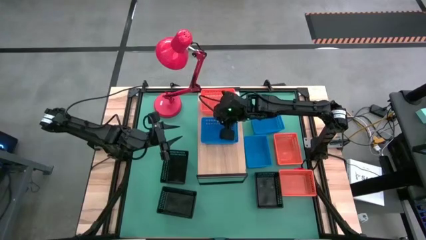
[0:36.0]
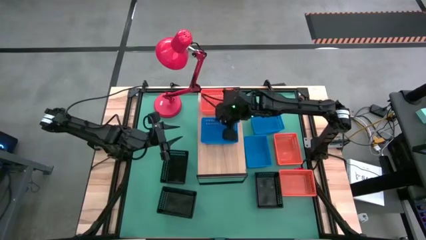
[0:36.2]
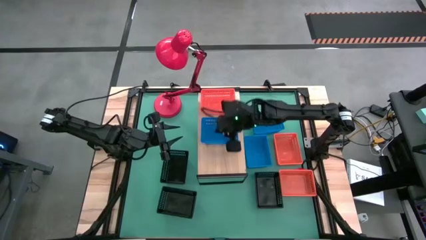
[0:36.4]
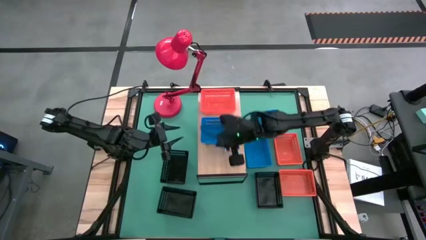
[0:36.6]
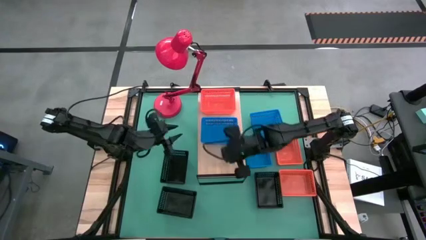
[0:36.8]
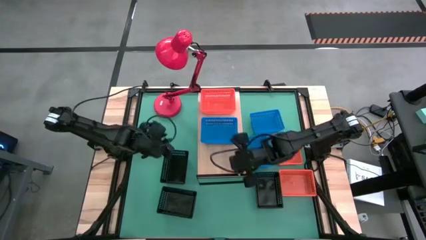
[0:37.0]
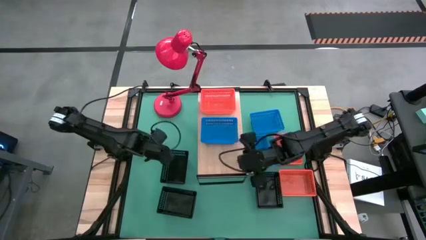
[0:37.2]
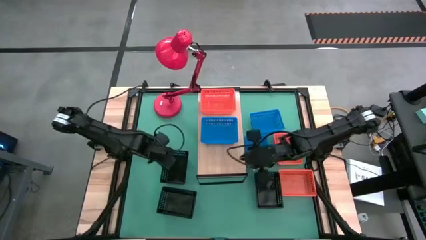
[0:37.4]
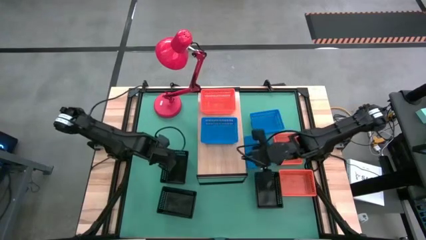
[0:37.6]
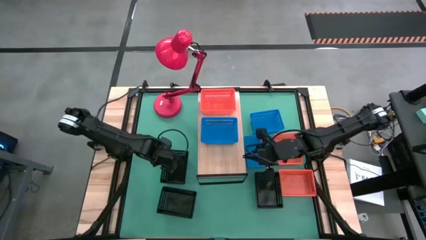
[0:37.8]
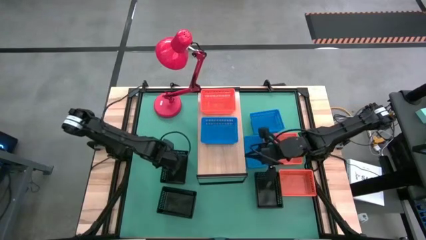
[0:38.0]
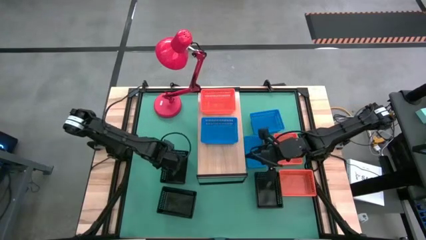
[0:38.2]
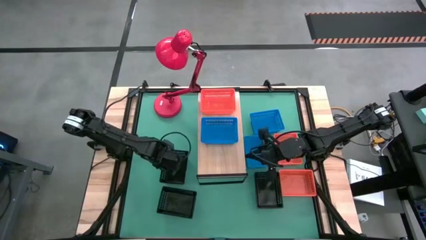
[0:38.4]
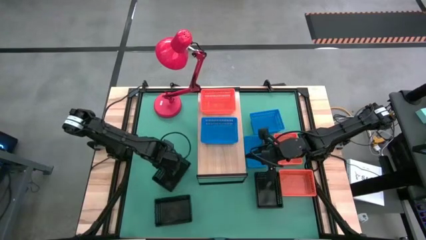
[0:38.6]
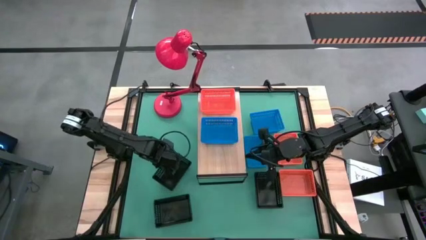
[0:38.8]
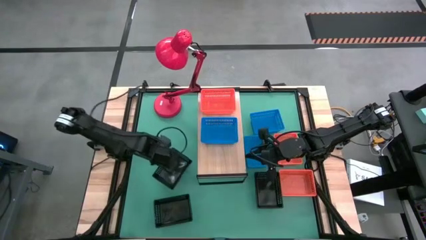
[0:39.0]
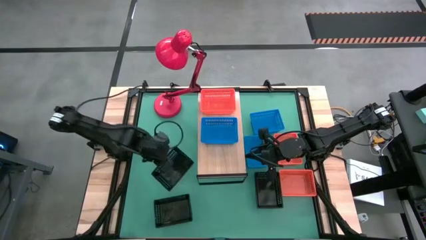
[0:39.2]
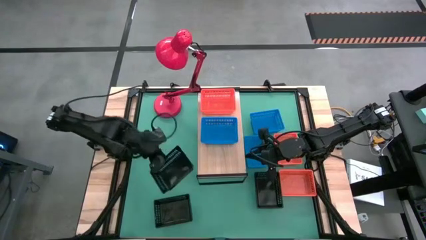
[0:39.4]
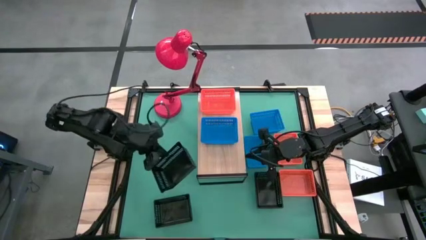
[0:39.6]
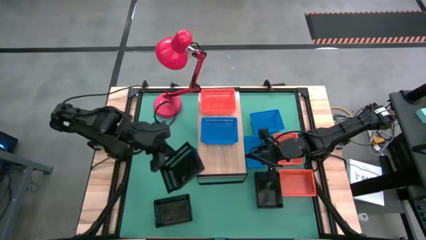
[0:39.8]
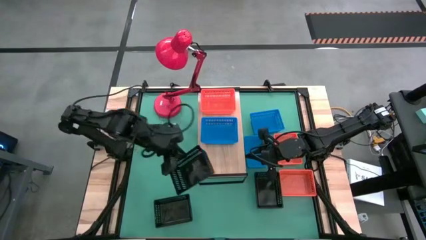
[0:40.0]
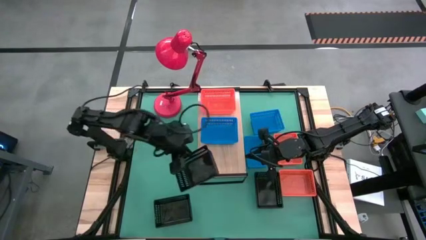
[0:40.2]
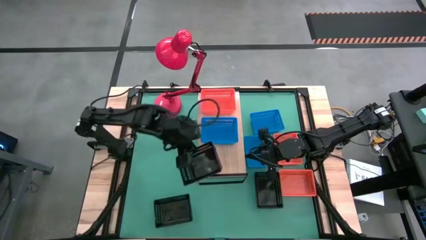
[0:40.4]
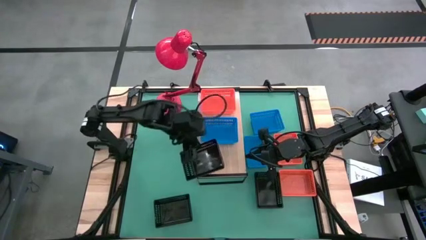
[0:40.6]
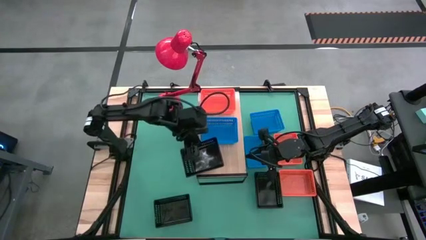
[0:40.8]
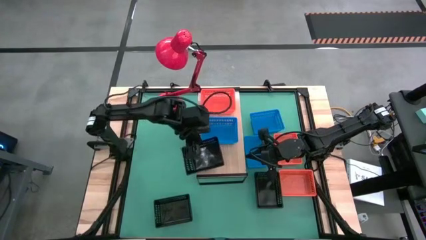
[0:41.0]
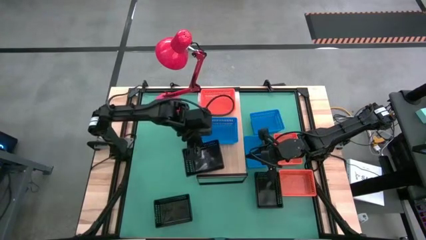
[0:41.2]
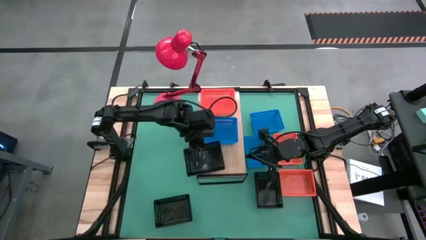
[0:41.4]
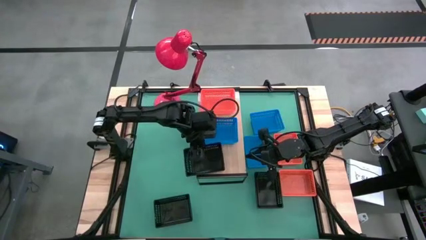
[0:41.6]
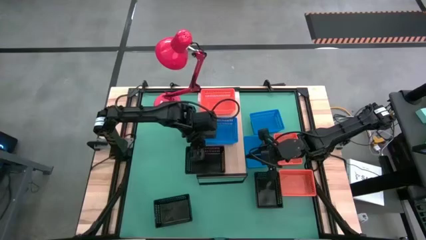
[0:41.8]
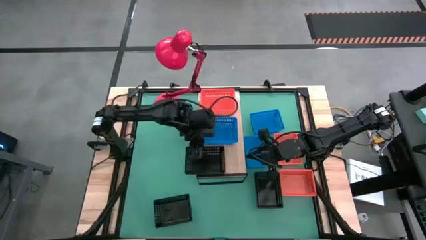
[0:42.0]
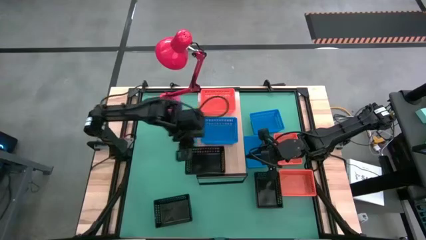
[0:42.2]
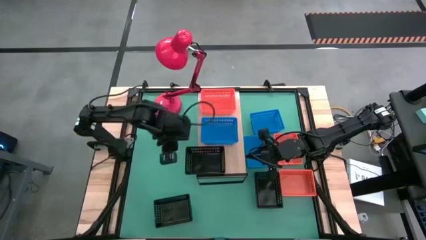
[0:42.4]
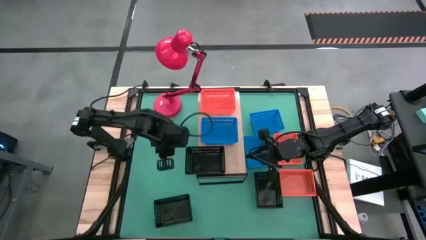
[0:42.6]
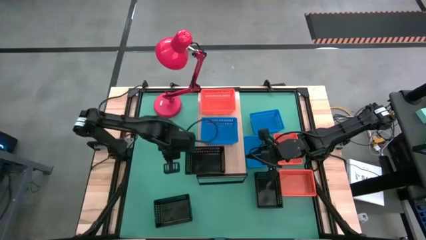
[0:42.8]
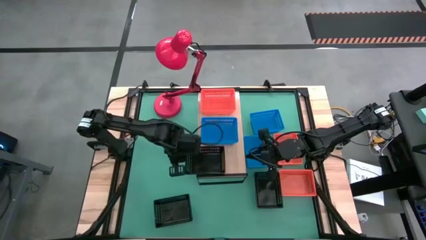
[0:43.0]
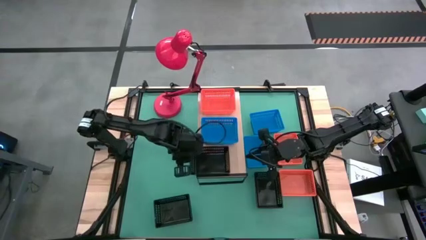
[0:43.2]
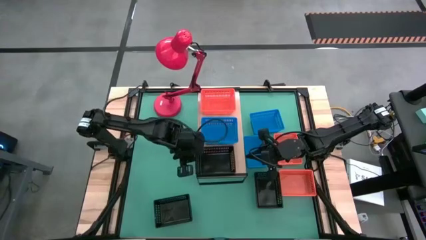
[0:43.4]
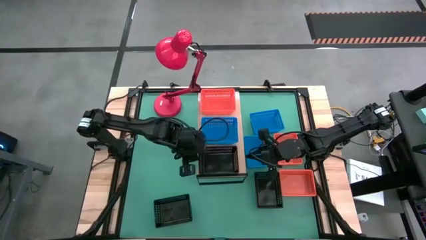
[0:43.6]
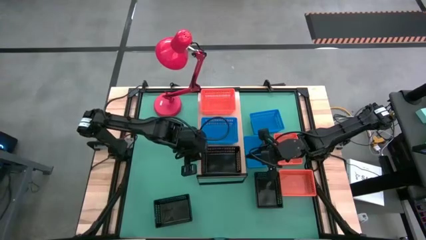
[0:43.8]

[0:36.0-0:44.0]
Task: Stack baskets on shelf by color
Put the top left black bin on the shelf

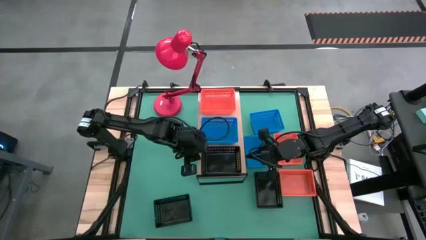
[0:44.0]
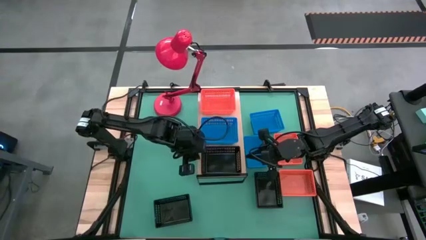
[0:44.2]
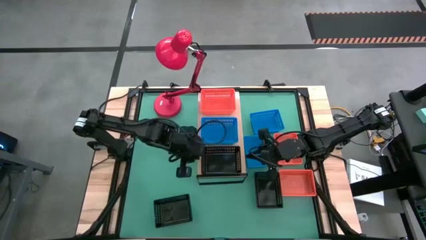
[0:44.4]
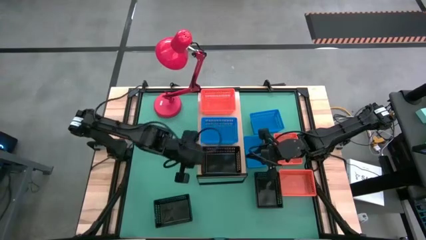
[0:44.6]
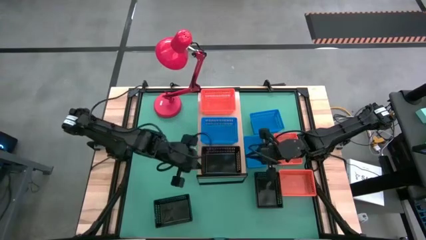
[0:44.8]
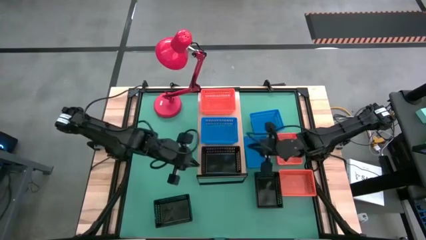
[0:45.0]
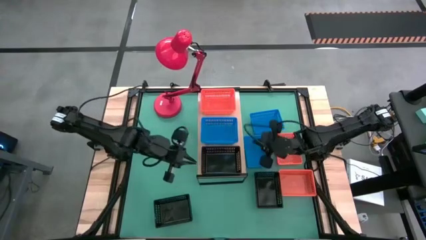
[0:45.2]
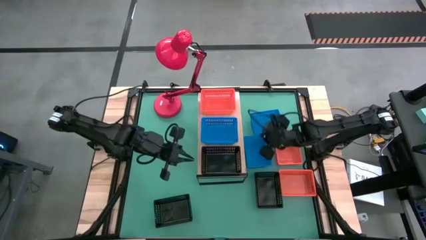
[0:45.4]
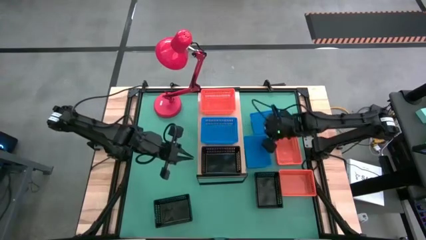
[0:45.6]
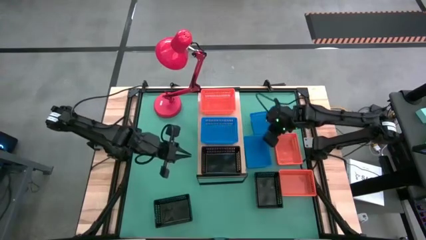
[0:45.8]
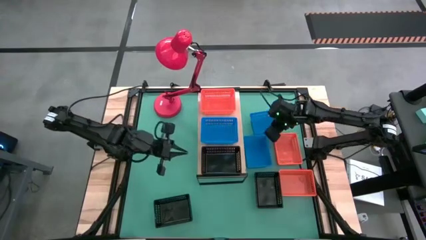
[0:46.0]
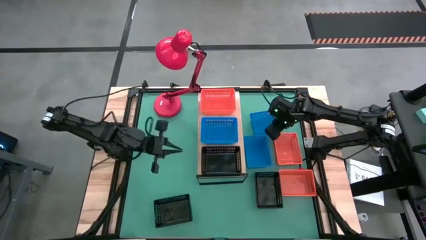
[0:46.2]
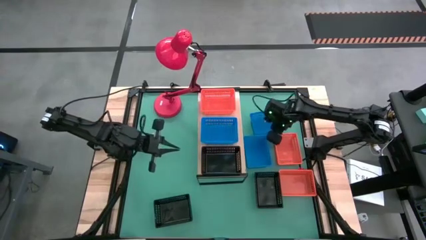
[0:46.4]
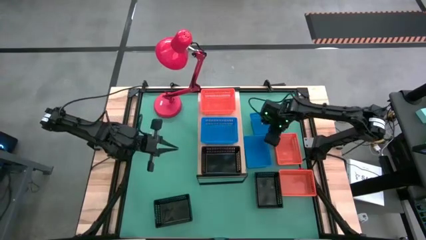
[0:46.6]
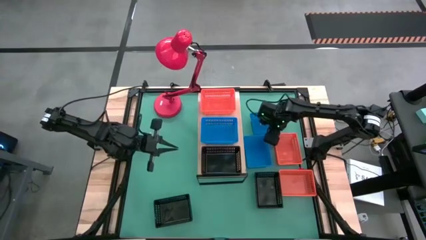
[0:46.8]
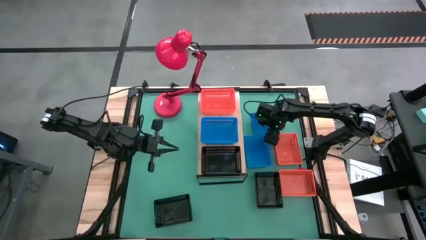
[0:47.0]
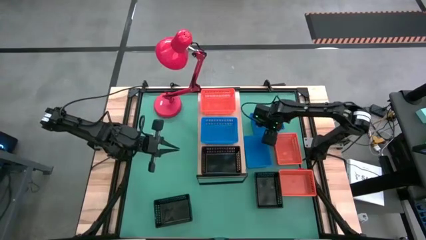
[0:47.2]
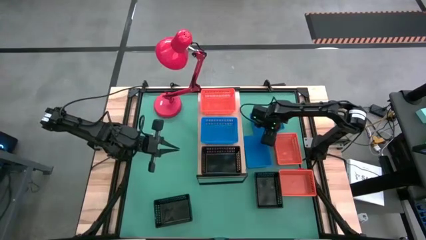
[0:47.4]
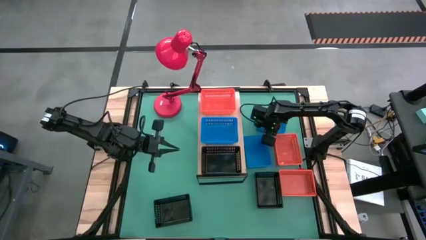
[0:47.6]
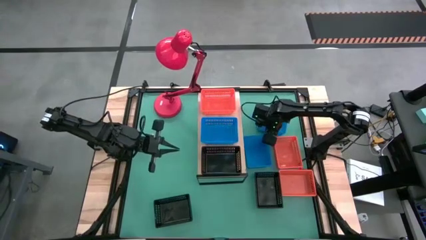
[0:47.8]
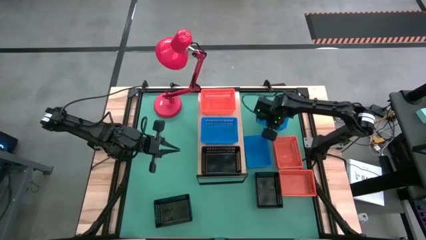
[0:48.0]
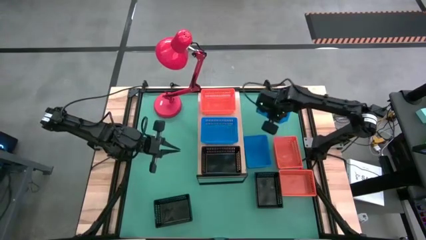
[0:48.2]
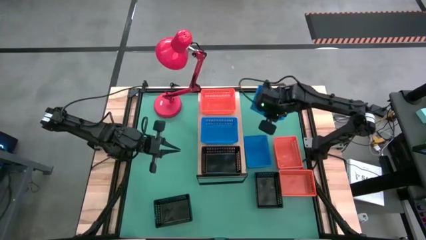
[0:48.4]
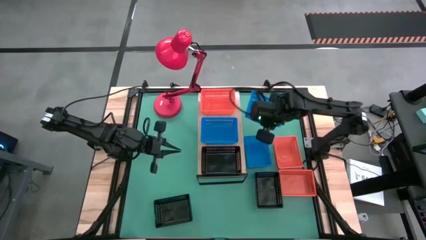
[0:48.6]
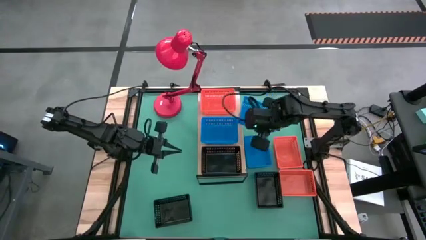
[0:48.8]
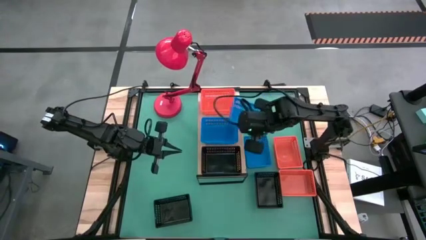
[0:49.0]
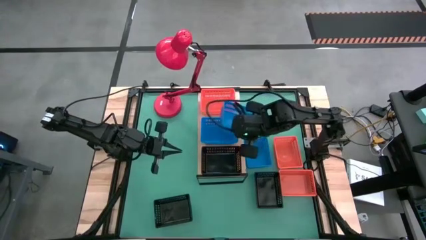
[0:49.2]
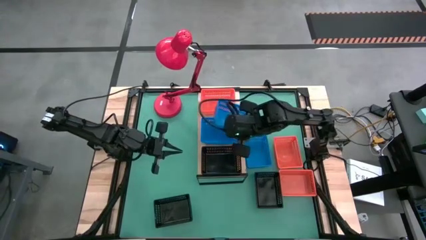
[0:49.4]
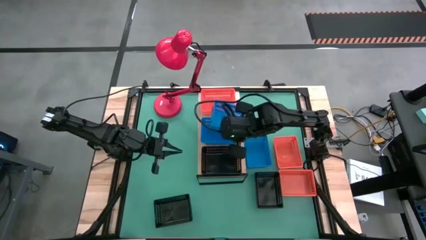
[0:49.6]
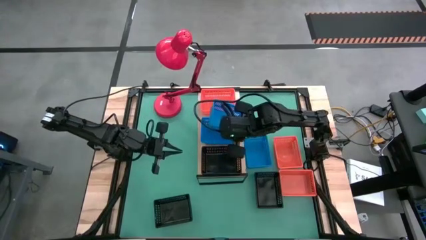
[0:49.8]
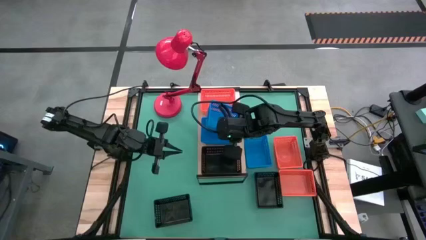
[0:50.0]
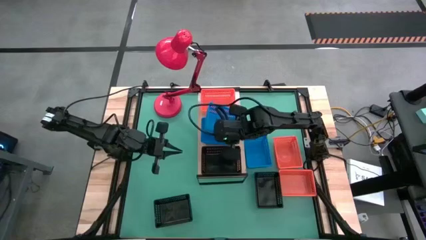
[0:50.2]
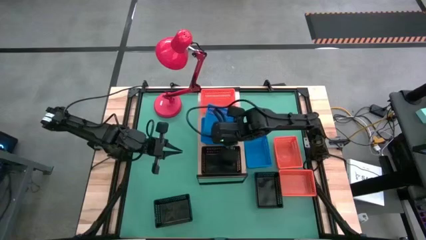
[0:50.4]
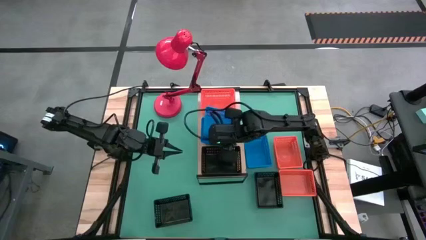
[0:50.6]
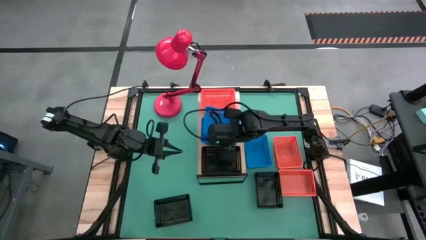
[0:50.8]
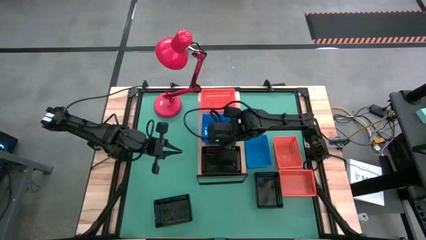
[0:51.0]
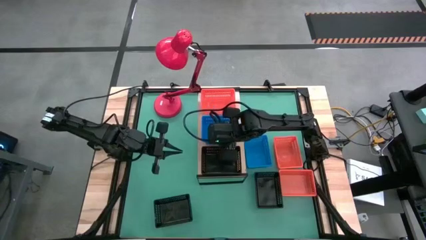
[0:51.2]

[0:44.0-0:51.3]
Stack the top blue bin on top of the blue bin on the shelf

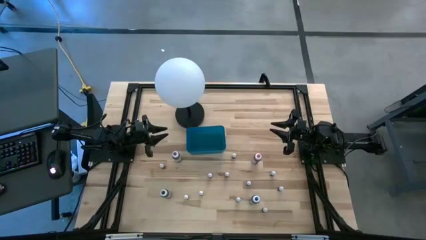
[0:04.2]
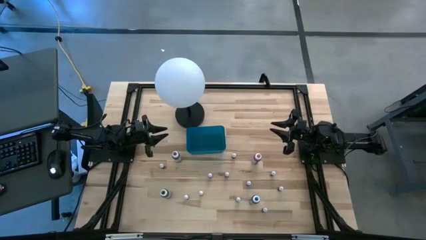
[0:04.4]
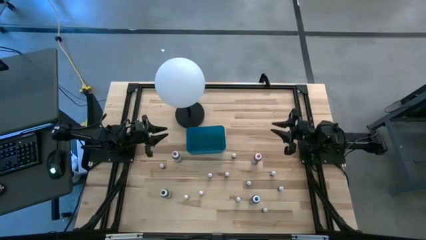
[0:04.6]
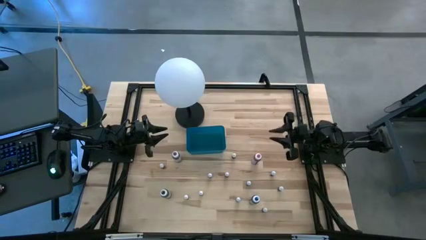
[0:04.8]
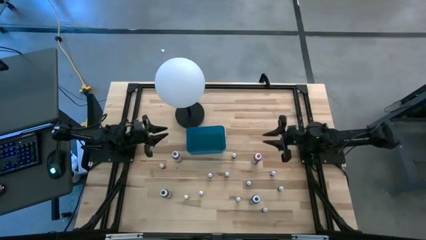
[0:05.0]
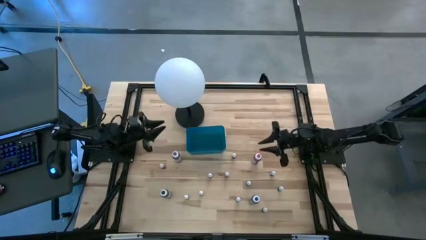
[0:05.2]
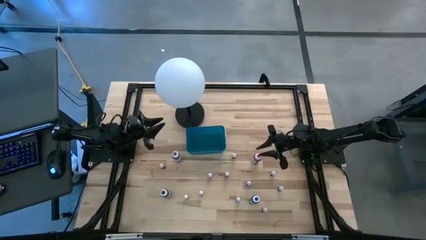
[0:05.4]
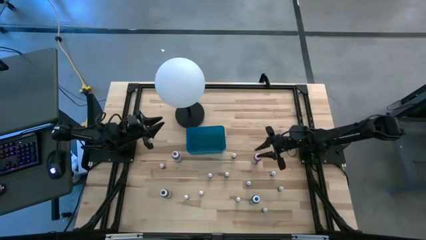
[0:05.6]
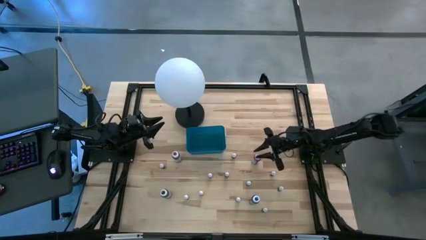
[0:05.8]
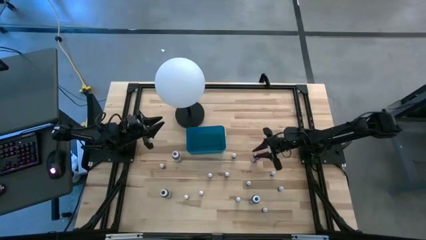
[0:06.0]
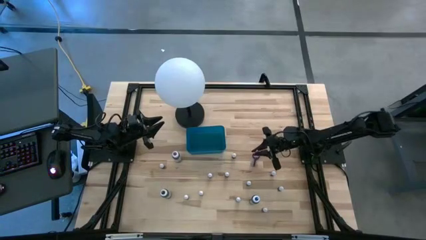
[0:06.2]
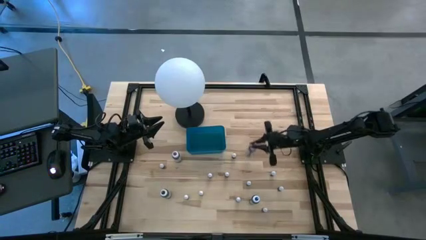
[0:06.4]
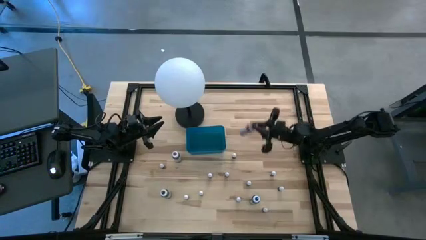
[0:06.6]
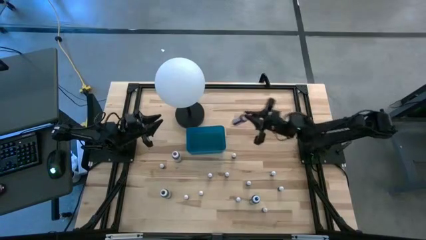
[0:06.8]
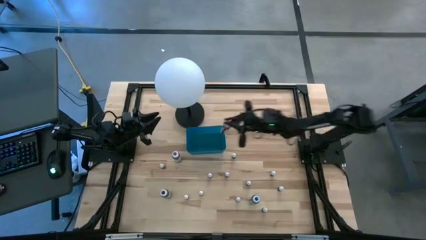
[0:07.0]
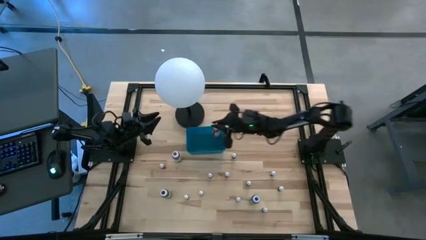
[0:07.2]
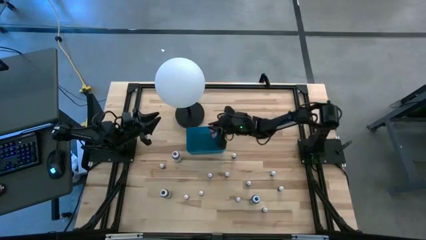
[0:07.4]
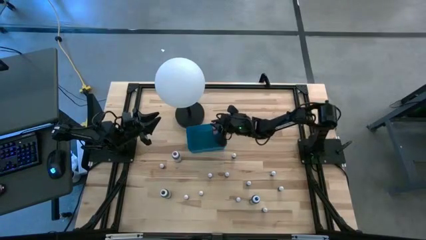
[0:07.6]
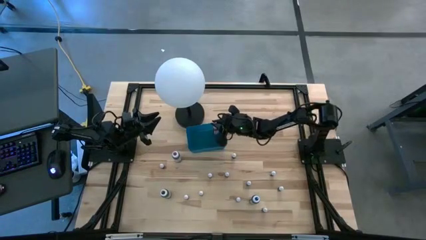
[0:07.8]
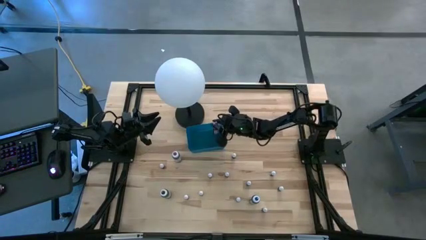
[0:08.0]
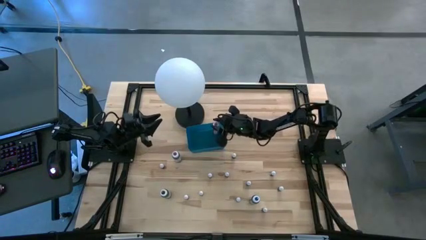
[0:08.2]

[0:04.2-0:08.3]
Task: Pick & Place food coloring
Put the large pink food coloring bottle into the blue container
